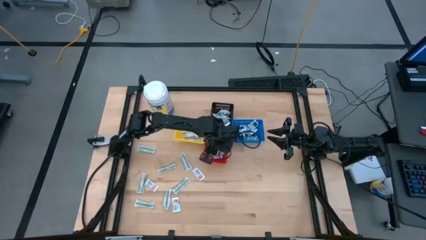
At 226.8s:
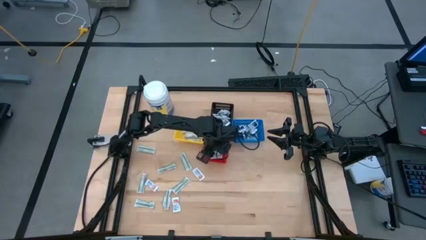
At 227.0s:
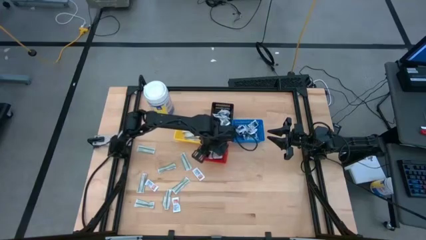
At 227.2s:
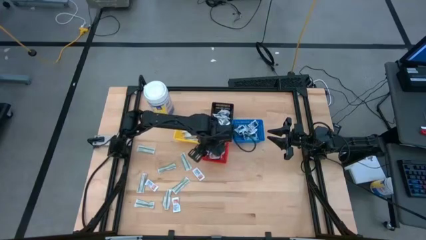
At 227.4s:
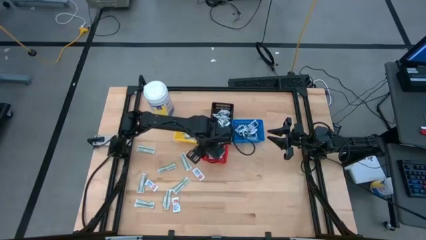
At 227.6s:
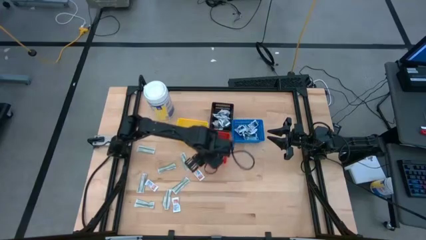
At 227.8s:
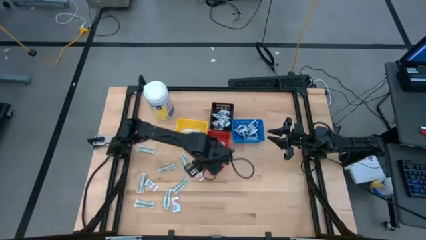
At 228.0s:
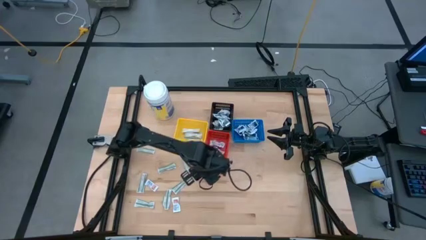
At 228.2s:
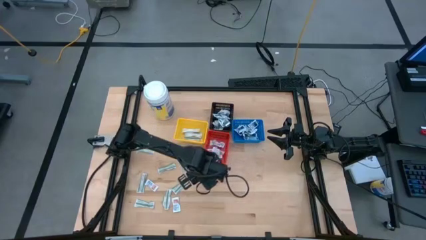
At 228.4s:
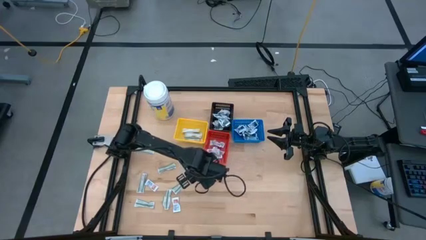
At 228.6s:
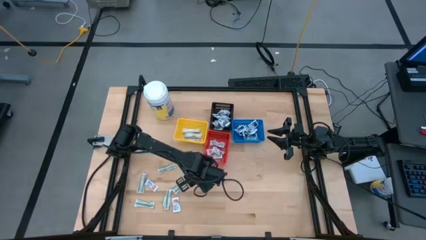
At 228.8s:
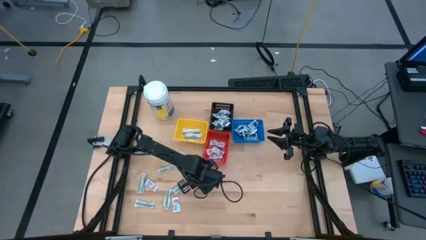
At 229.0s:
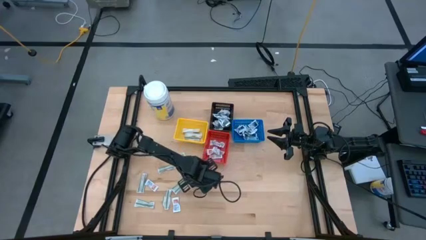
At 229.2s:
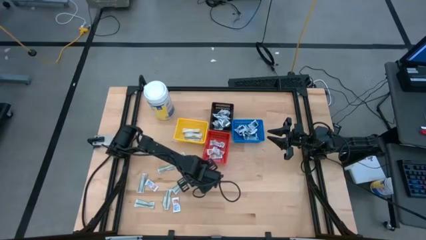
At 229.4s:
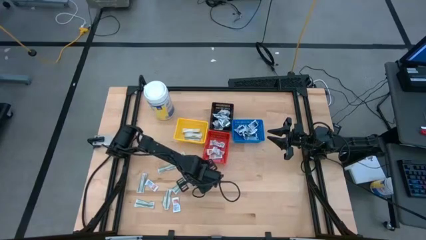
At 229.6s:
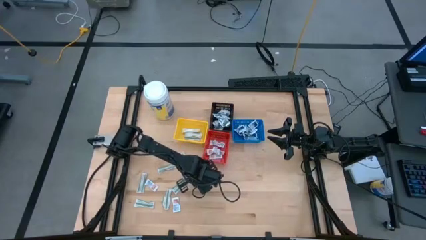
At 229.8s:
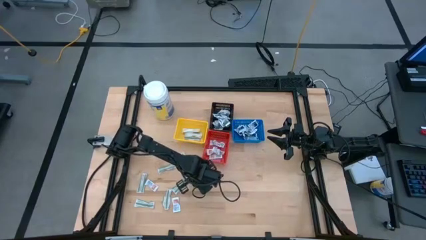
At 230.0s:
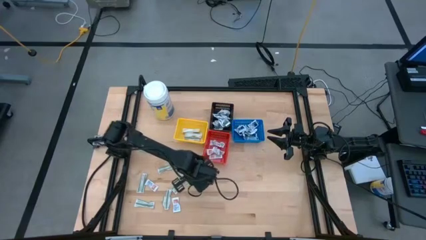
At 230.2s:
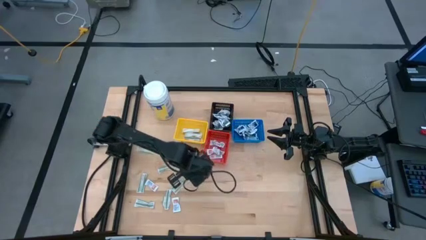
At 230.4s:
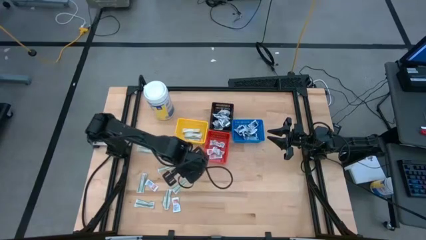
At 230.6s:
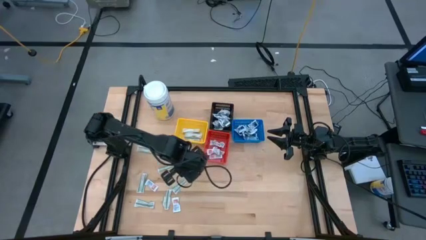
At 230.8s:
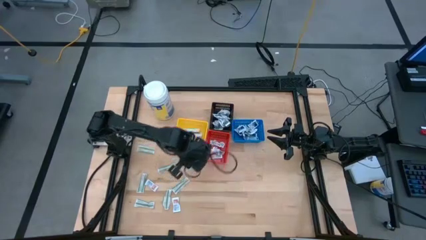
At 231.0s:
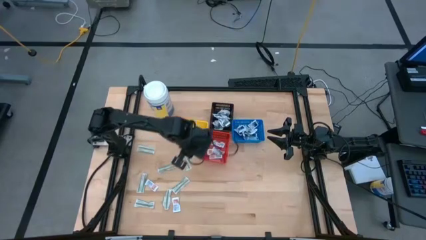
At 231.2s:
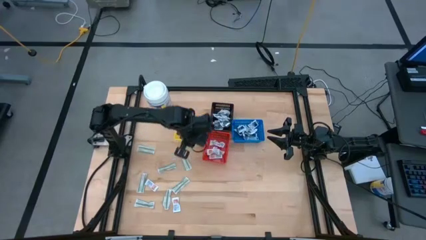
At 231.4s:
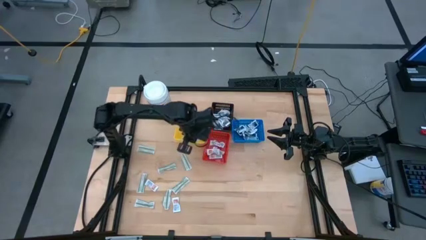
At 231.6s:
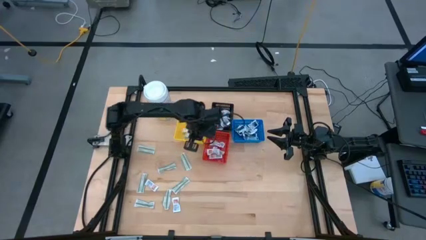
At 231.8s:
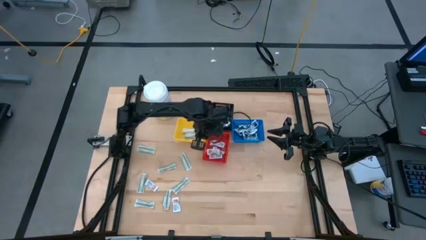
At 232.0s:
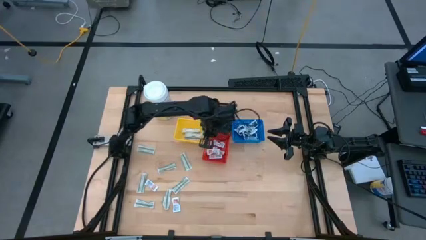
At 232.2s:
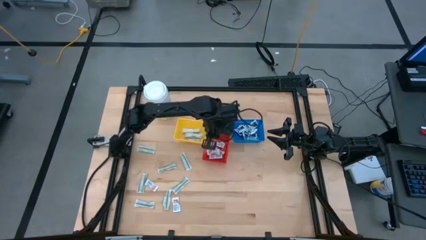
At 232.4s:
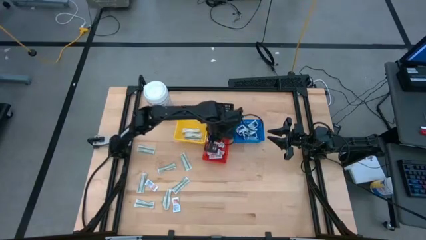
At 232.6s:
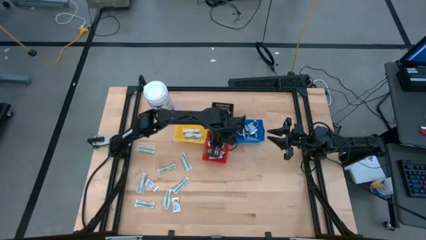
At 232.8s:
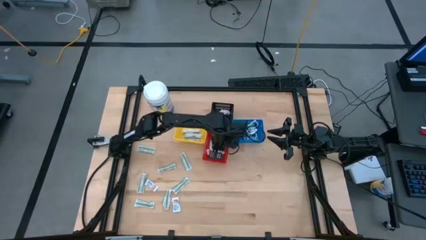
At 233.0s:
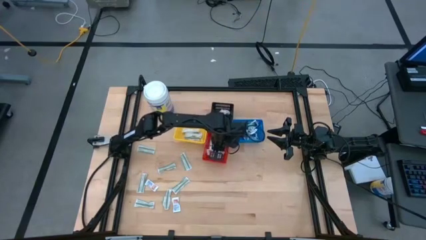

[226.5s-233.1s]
Task: Pick & Place First Aid Supplies
Put the ointment pack into the red bin

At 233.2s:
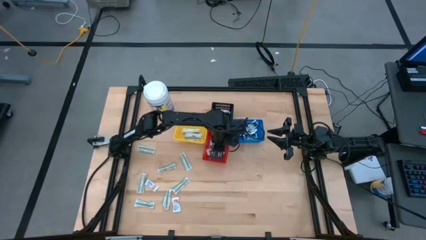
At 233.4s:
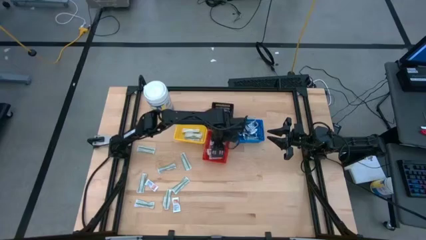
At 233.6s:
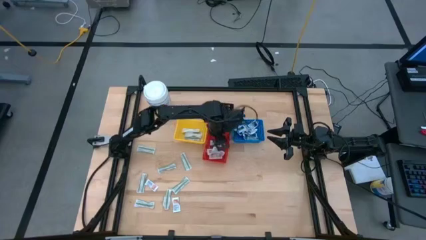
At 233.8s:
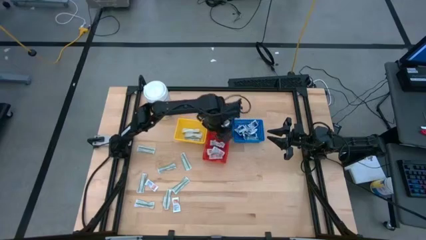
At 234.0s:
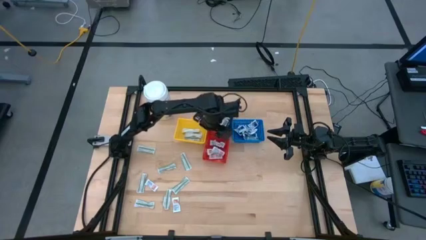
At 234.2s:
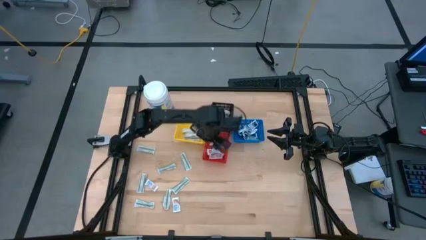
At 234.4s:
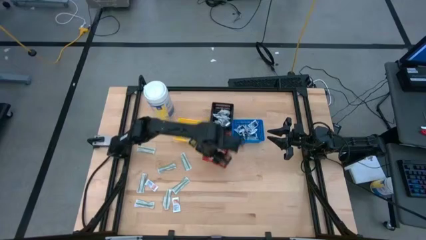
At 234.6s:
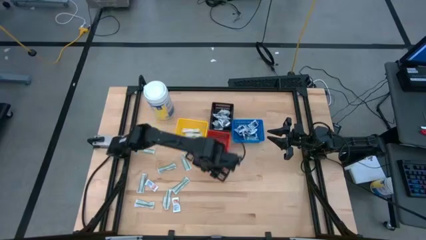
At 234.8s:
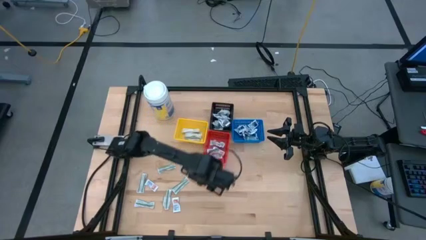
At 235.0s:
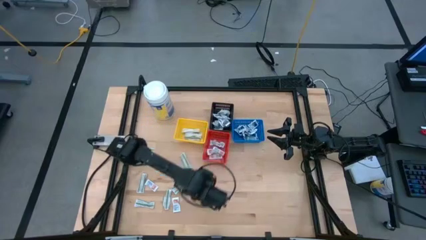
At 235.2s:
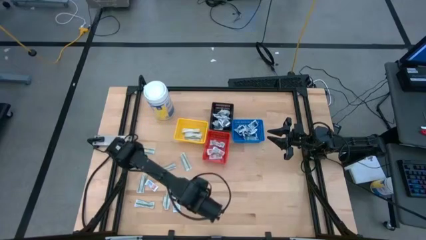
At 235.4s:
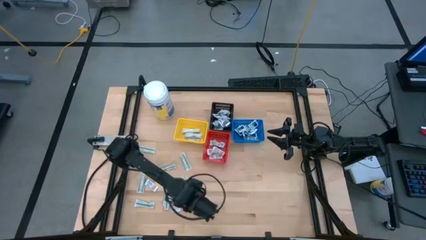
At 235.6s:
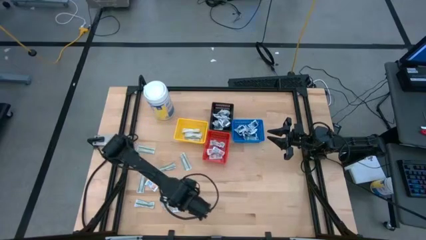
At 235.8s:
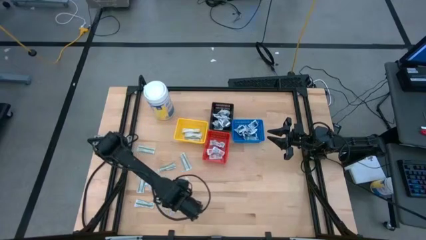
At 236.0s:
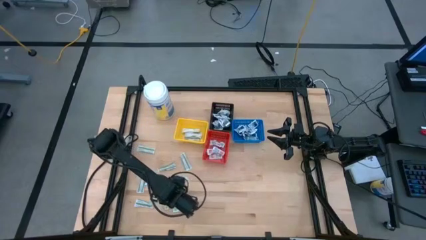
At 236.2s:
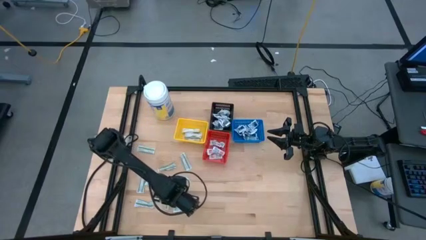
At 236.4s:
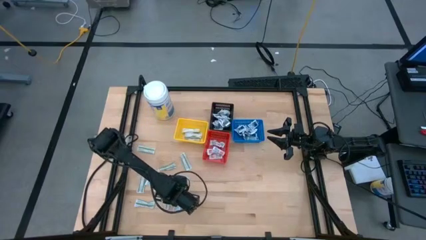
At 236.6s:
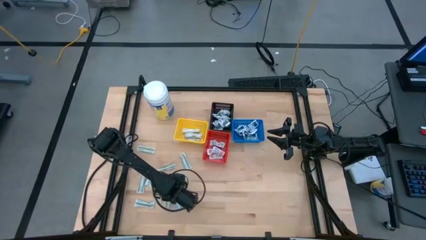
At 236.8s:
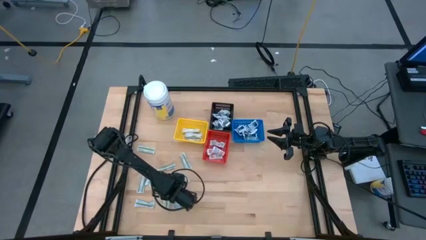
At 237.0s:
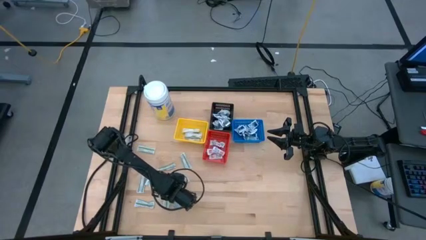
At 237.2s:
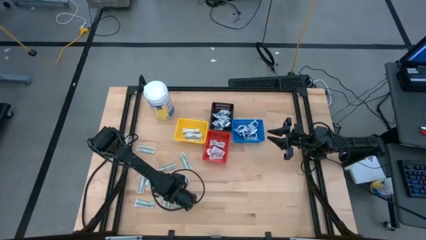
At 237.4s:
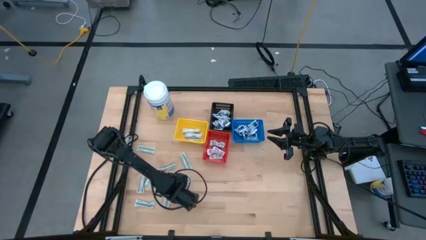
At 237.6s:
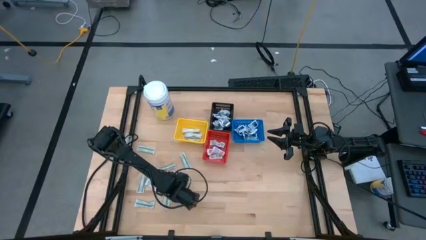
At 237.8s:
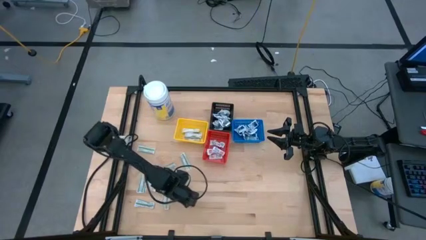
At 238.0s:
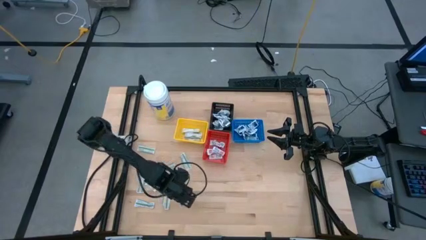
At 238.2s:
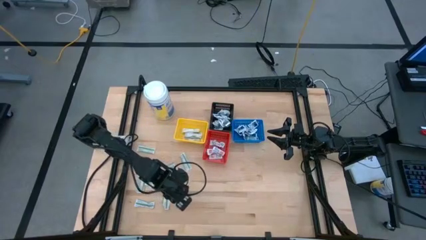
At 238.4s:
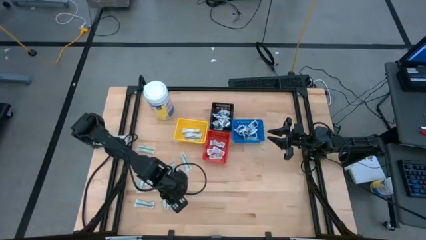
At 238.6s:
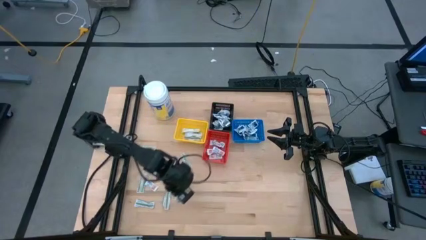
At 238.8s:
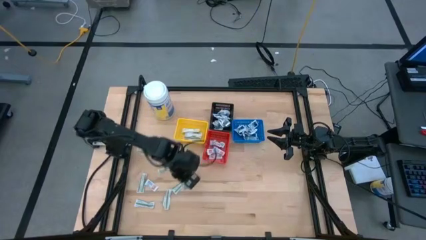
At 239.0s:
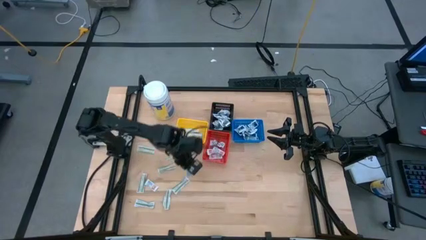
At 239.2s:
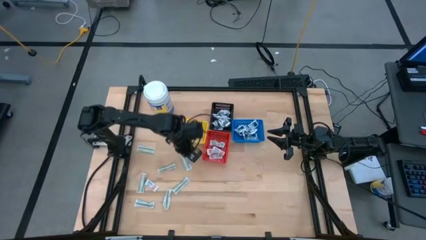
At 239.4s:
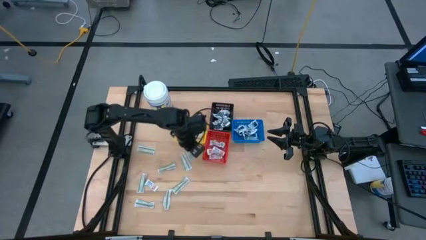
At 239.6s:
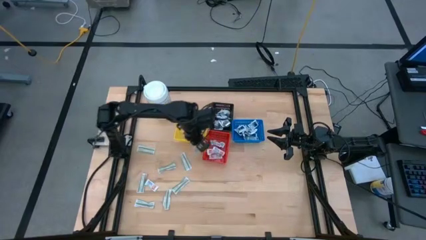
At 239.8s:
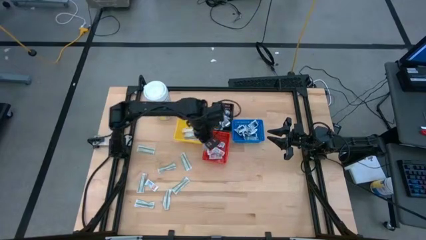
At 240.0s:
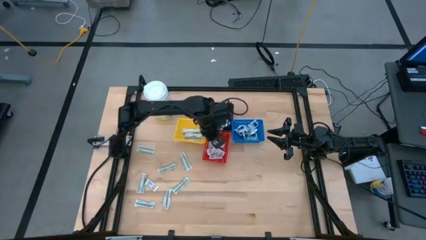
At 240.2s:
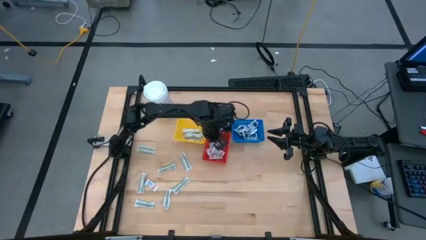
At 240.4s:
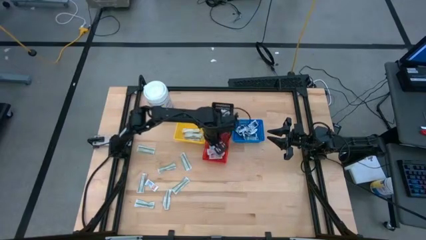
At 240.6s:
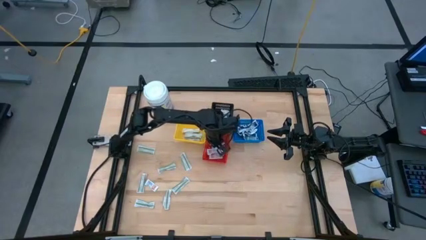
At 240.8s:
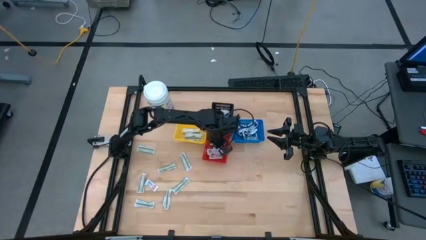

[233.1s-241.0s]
Put the ointment pack into the red bin
